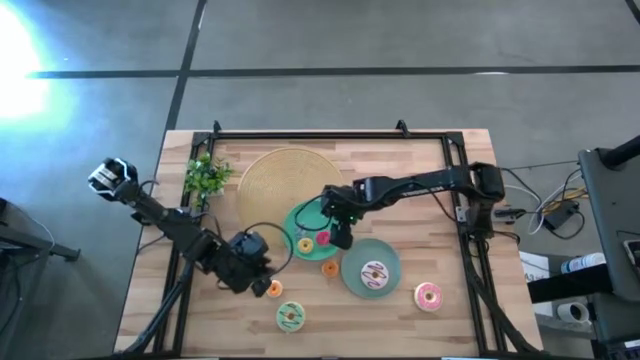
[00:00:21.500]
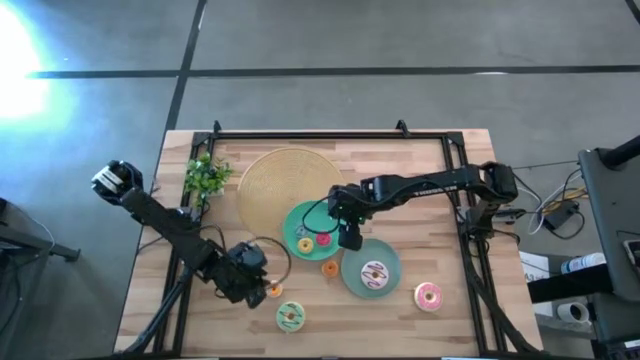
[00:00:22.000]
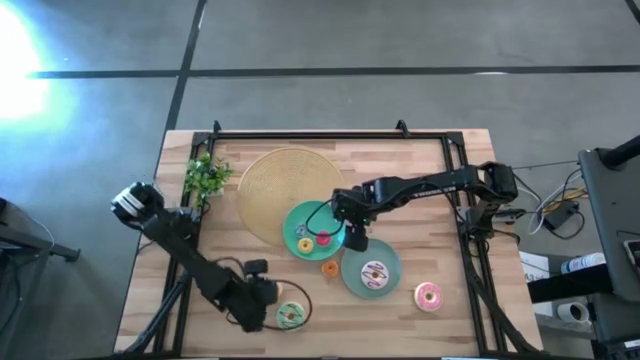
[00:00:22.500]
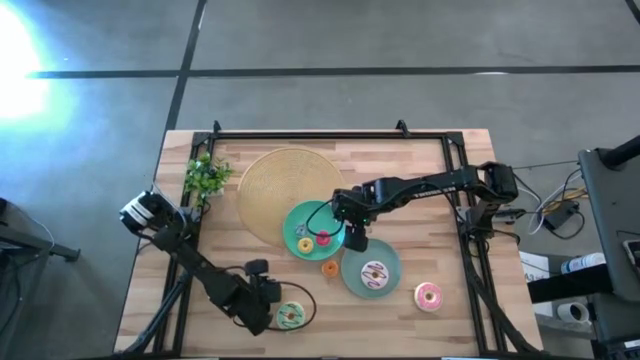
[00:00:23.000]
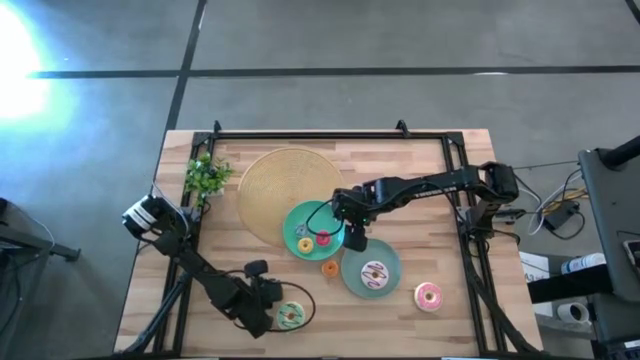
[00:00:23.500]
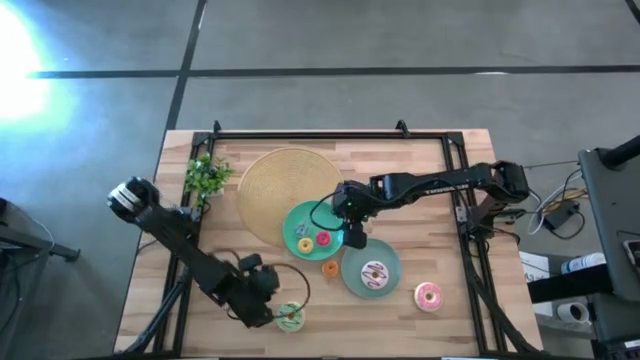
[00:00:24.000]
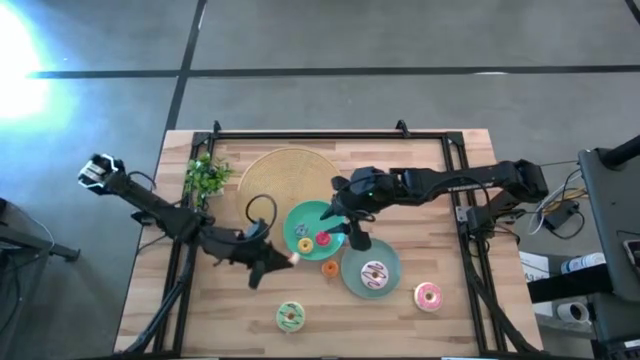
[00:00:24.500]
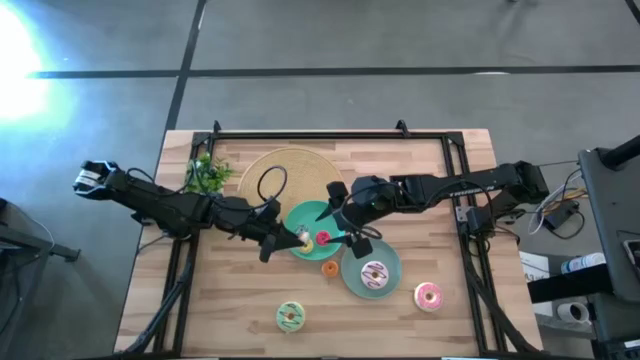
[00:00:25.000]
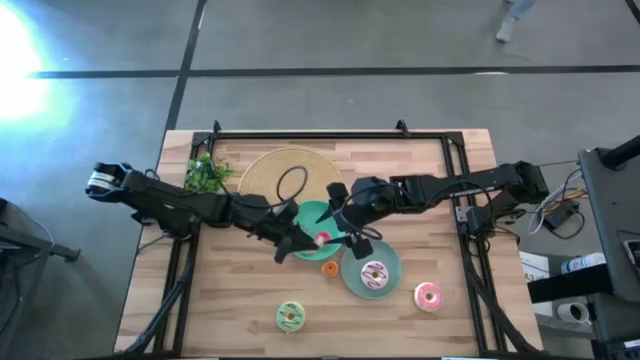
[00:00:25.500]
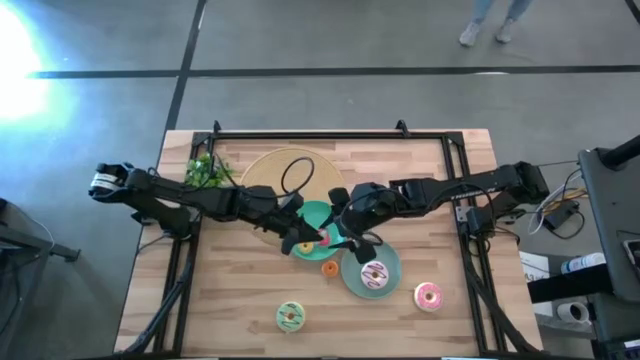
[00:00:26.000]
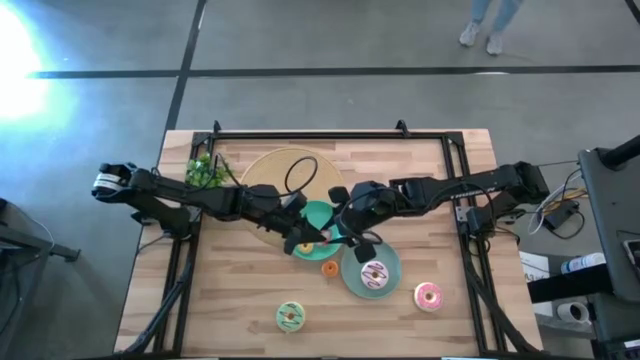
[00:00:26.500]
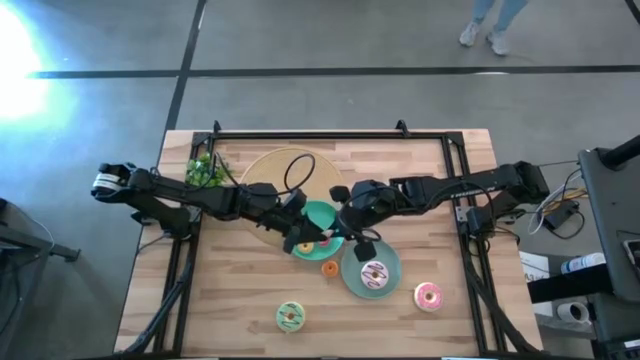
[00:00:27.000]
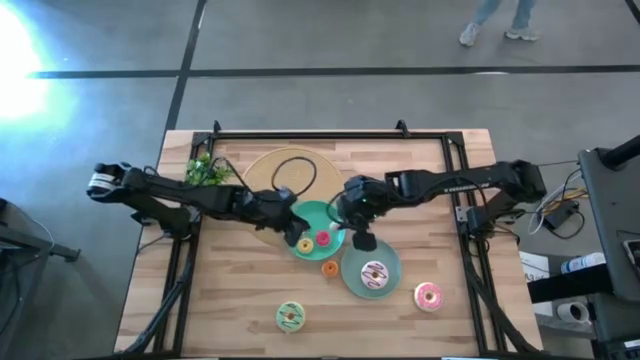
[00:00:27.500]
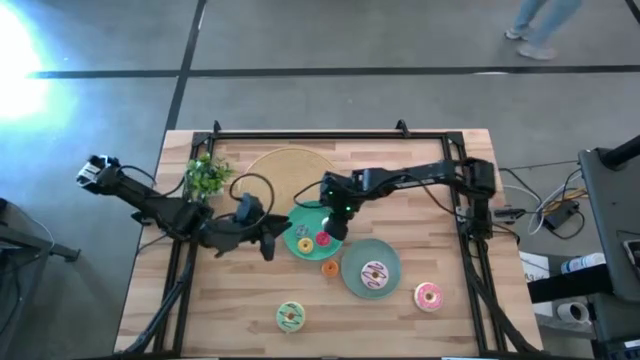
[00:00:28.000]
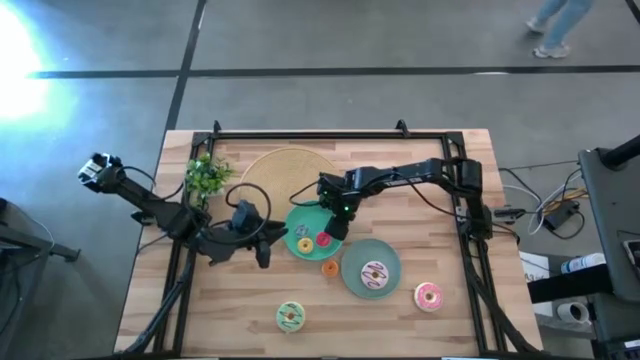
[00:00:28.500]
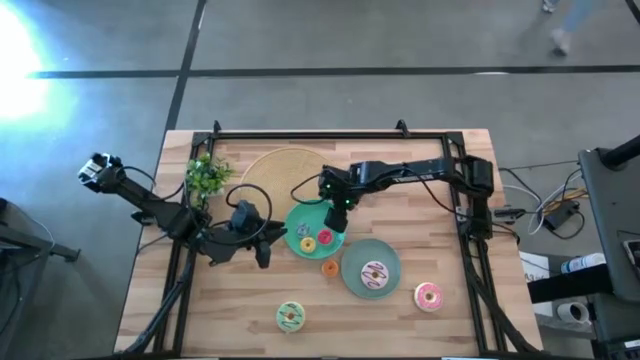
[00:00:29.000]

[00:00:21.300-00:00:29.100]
Task: Pick & Place donuts
Put the small white doughnut on the blue plate

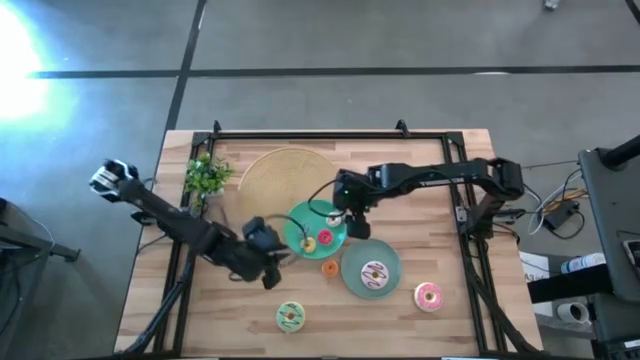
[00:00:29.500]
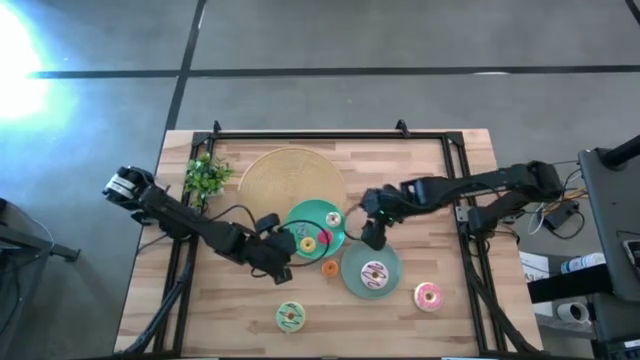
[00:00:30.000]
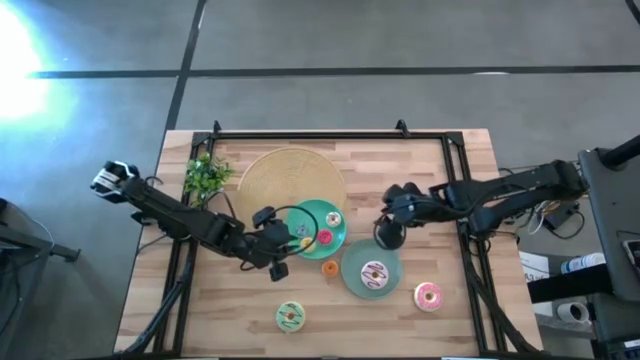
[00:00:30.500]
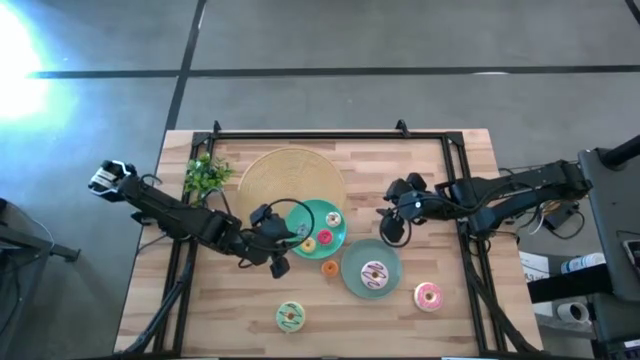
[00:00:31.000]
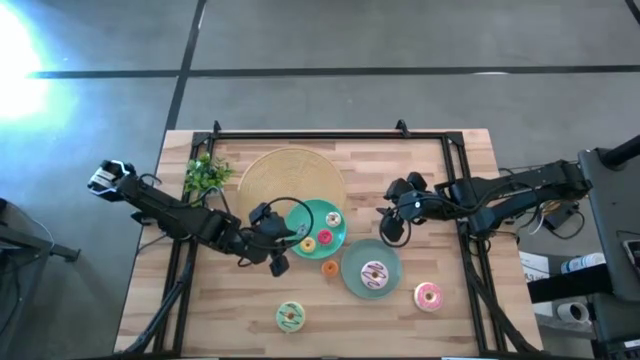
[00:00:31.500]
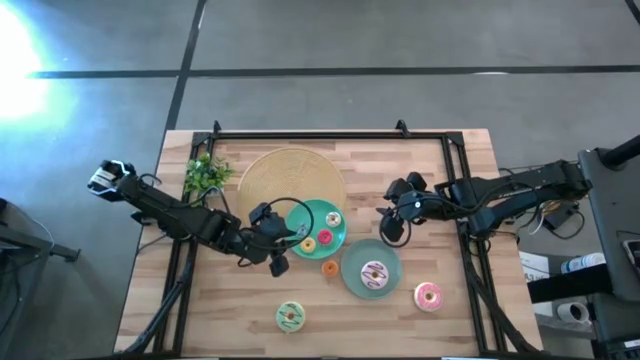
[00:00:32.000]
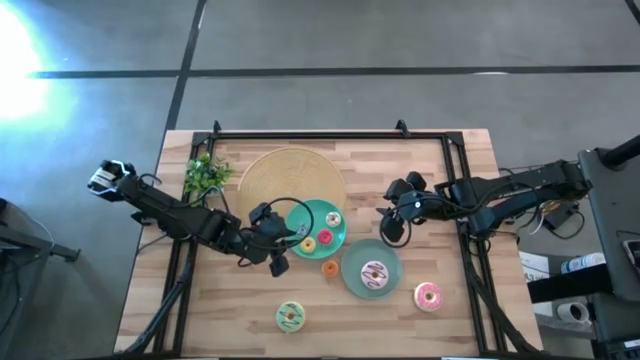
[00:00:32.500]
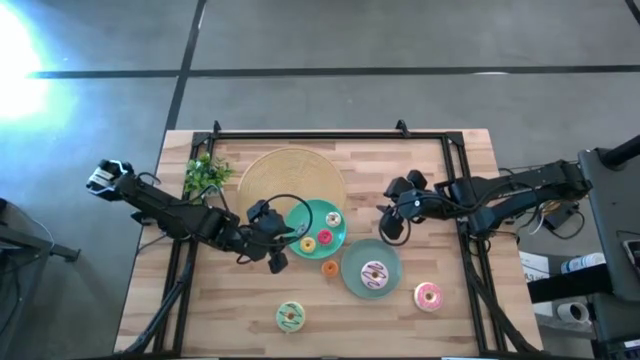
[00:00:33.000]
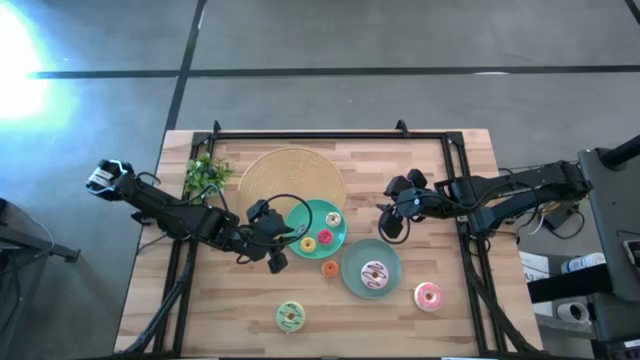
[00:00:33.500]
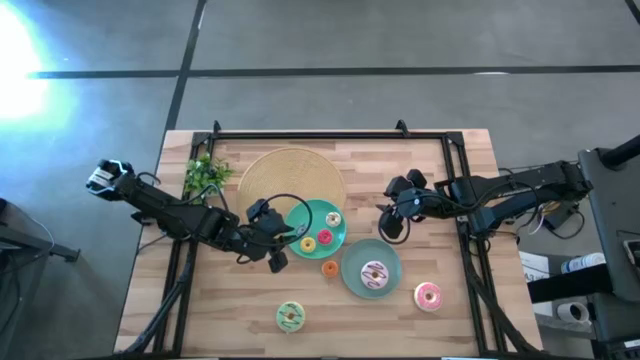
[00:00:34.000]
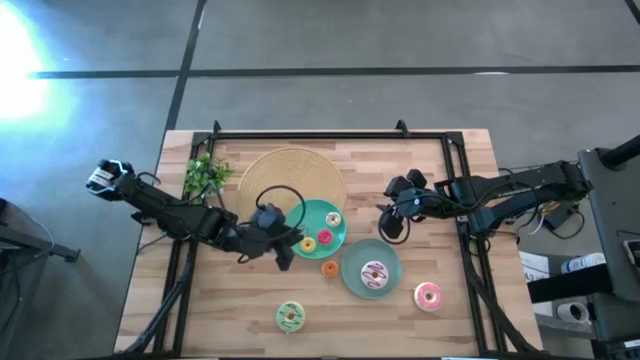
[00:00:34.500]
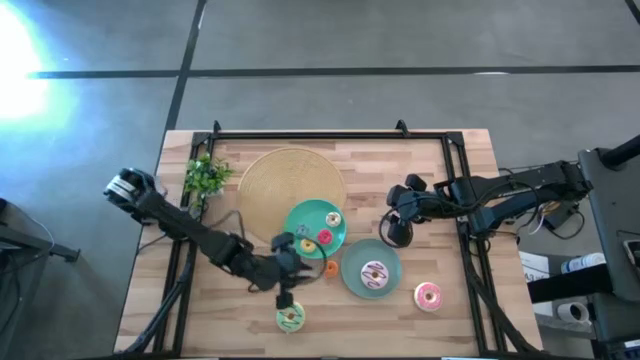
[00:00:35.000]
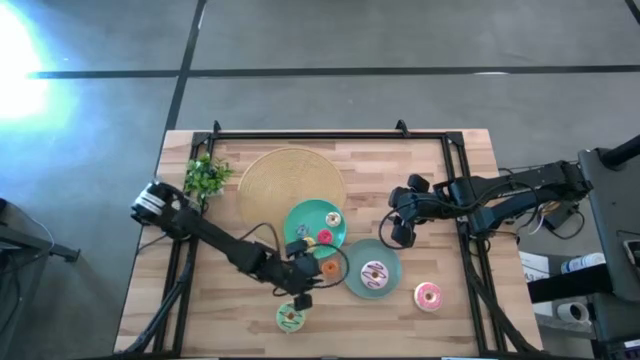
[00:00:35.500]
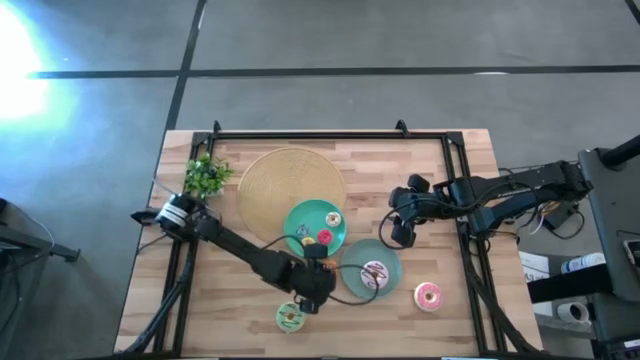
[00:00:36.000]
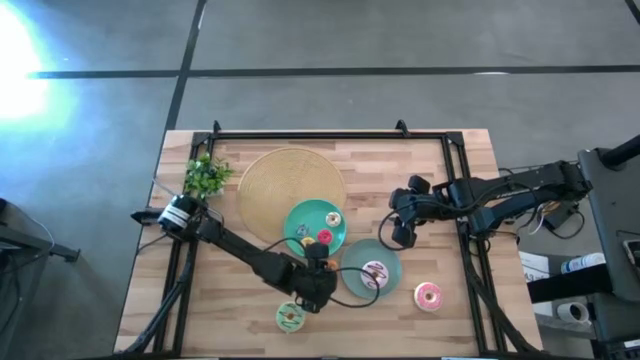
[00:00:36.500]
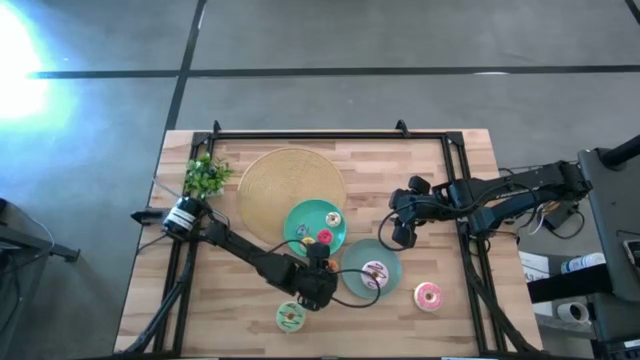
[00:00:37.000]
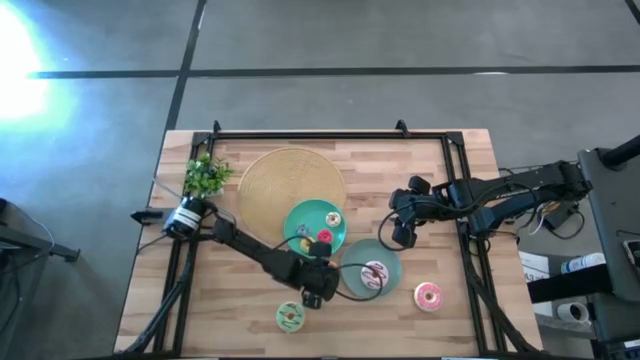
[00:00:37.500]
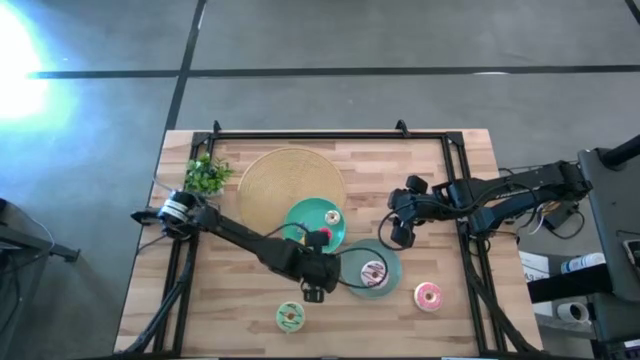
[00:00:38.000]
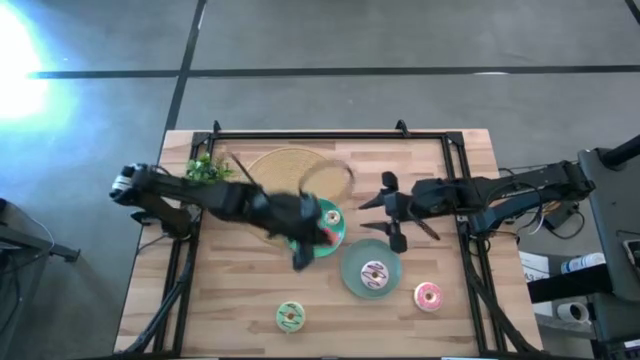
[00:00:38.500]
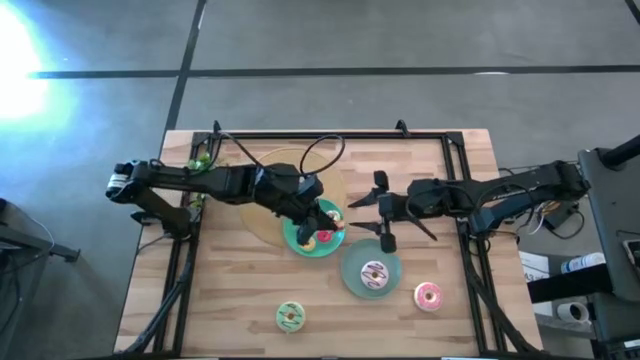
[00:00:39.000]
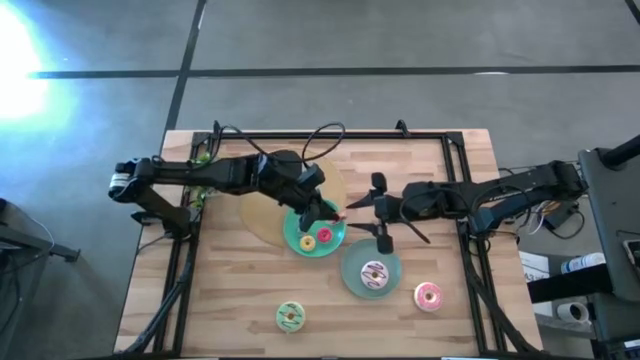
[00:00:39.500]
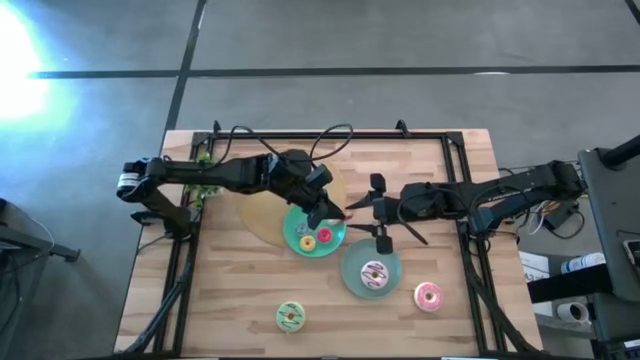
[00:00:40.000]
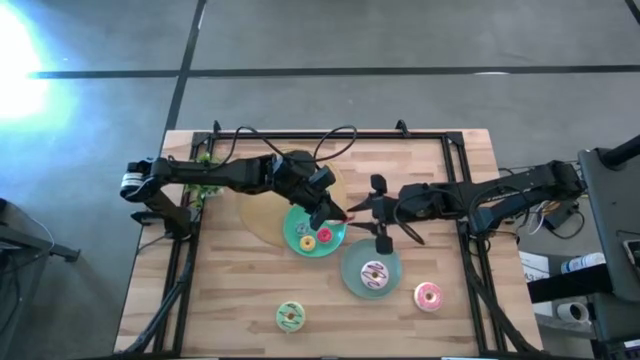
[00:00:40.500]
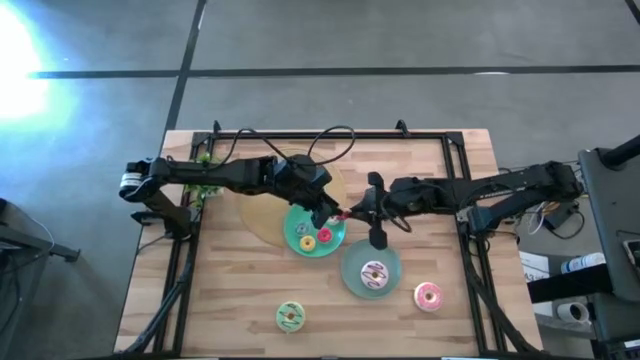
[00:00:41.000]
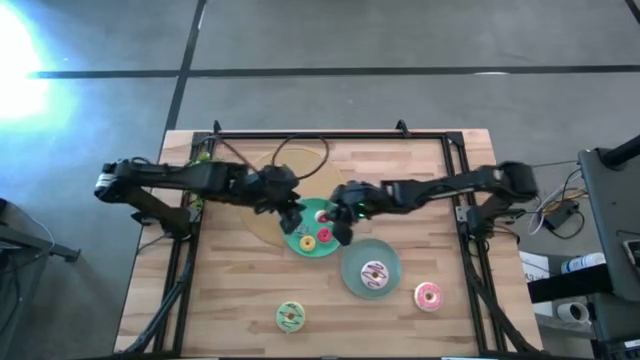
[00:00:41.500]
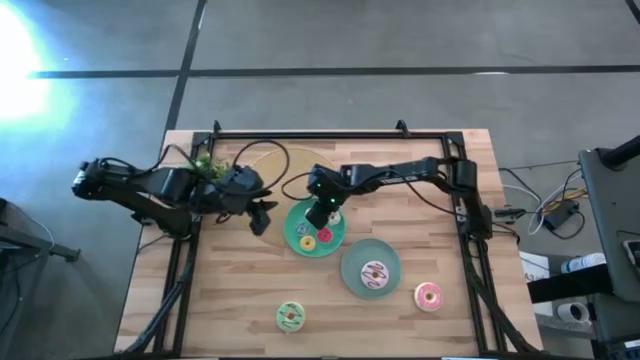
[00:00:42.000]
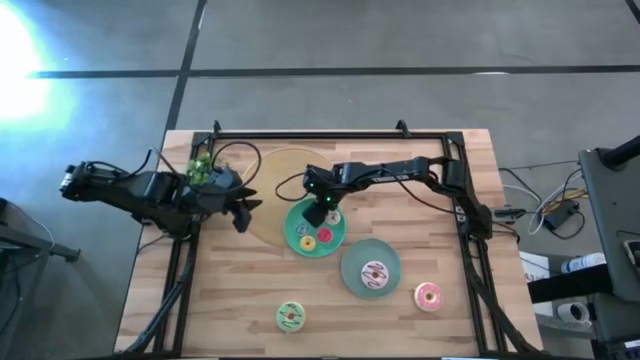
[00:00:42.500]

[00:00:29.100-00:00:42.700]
Put the small orange doughnut on the blue plate
